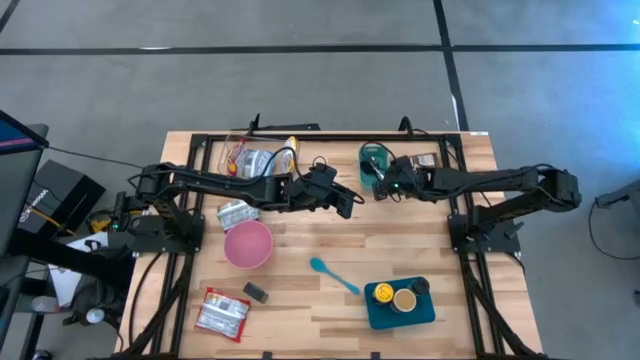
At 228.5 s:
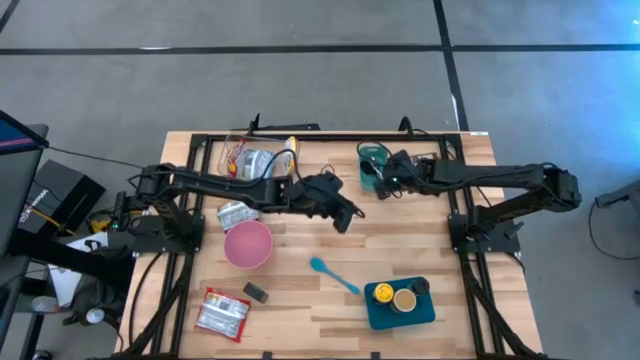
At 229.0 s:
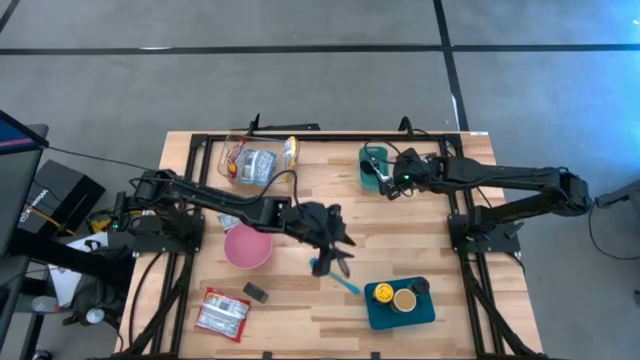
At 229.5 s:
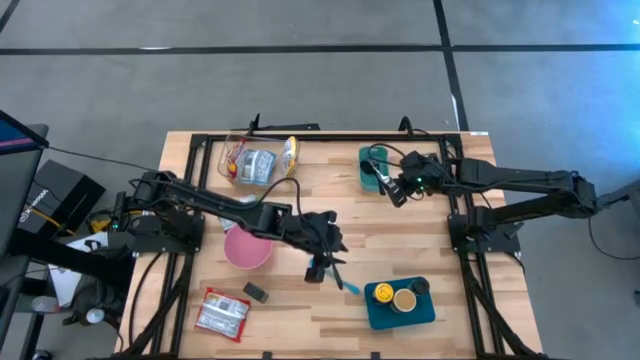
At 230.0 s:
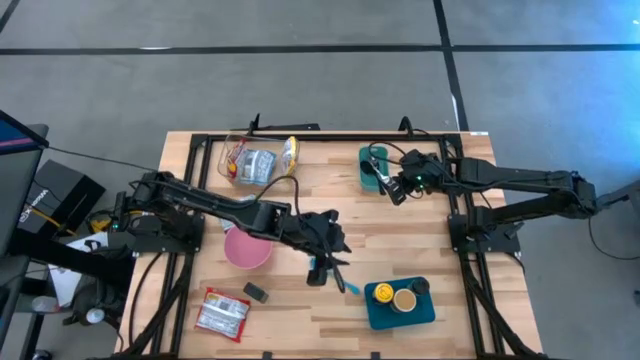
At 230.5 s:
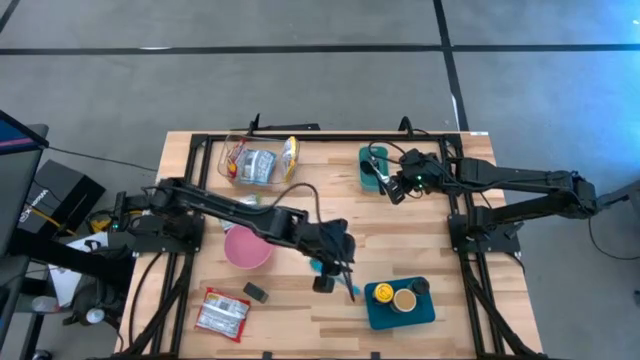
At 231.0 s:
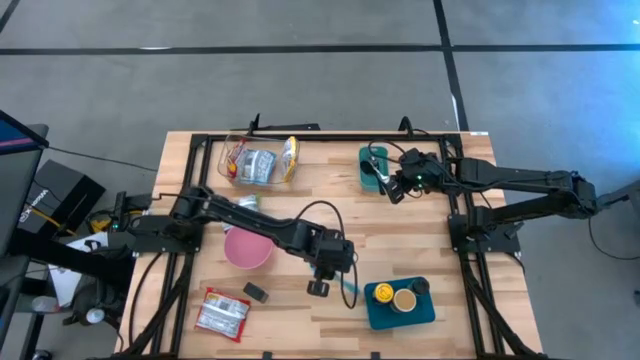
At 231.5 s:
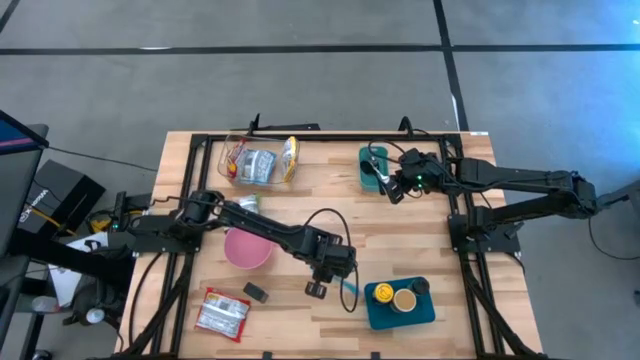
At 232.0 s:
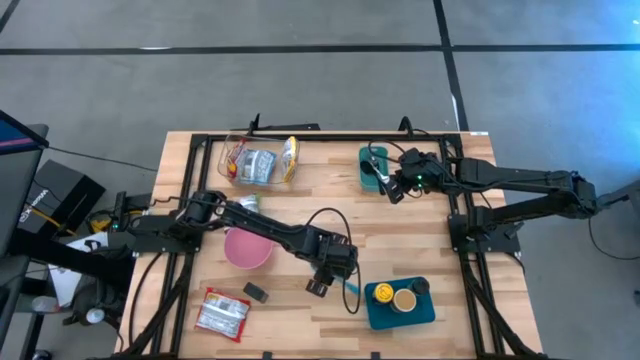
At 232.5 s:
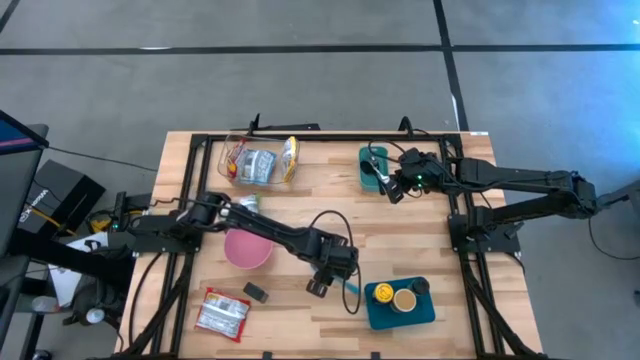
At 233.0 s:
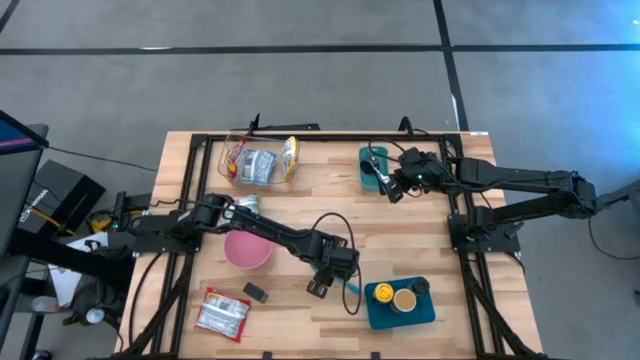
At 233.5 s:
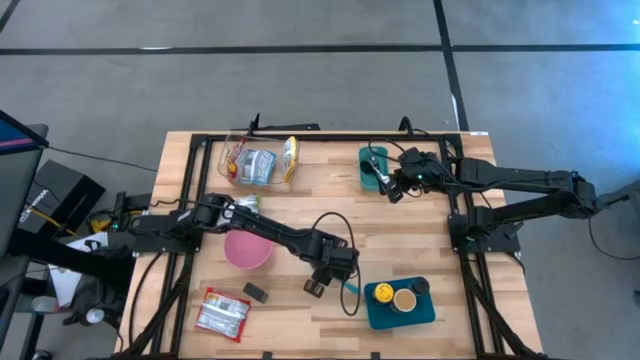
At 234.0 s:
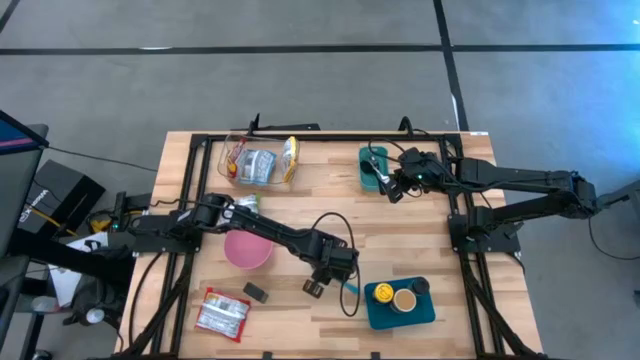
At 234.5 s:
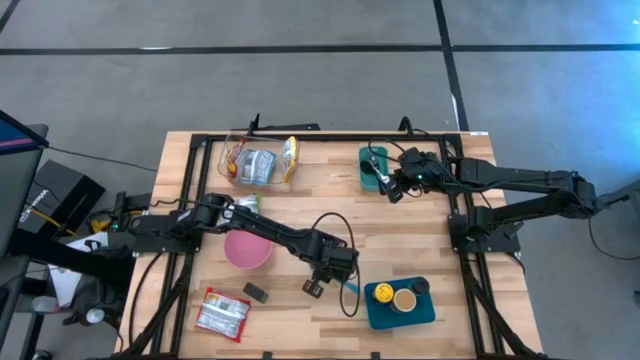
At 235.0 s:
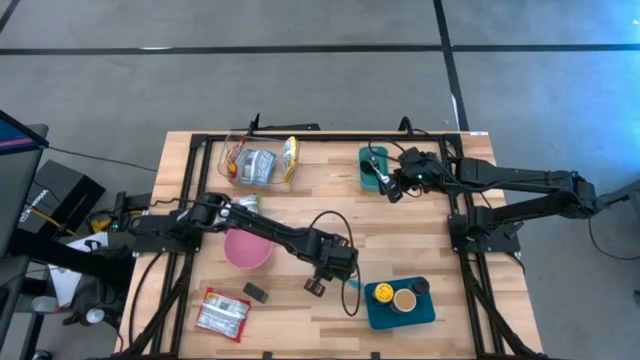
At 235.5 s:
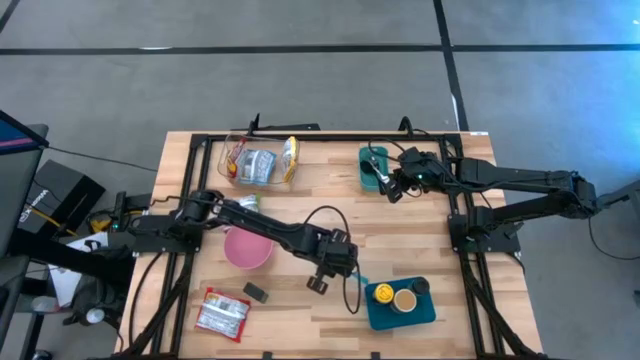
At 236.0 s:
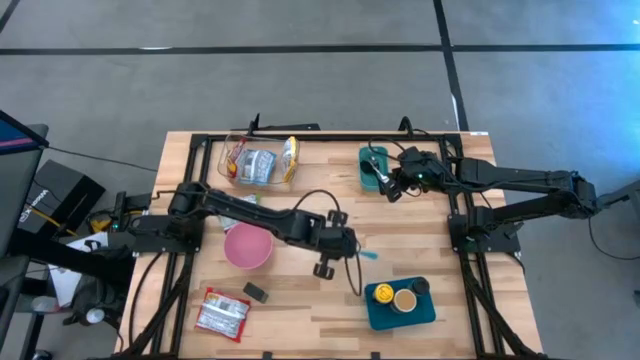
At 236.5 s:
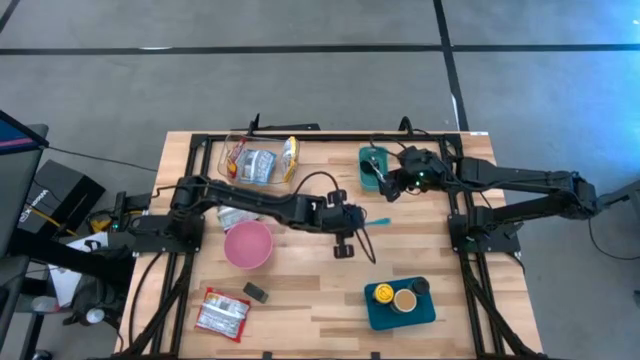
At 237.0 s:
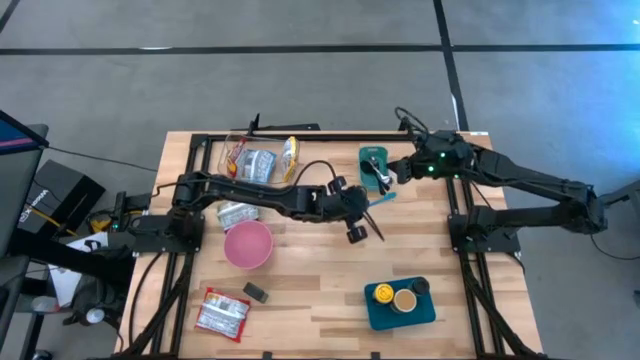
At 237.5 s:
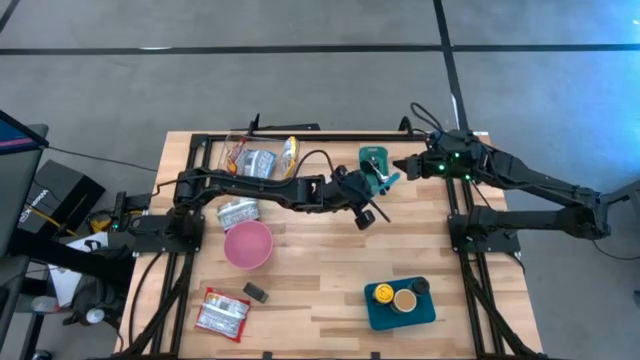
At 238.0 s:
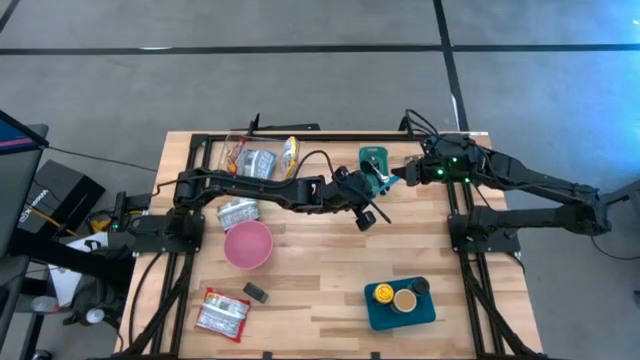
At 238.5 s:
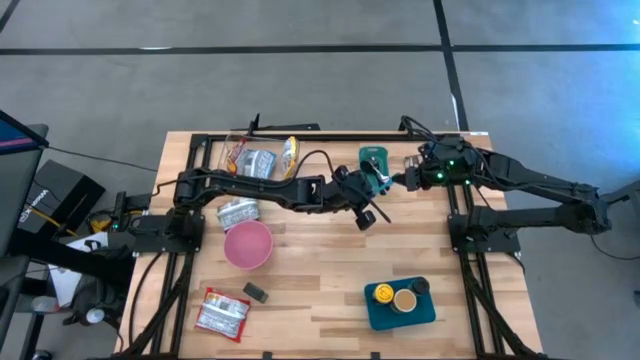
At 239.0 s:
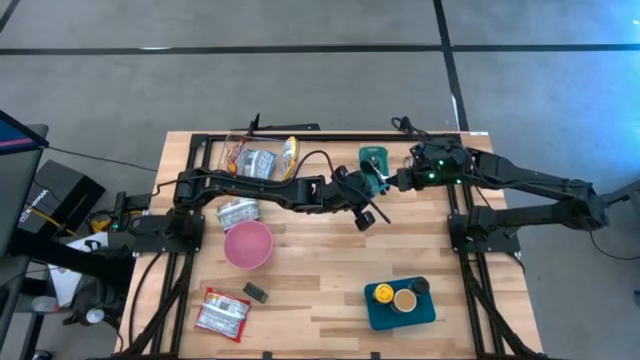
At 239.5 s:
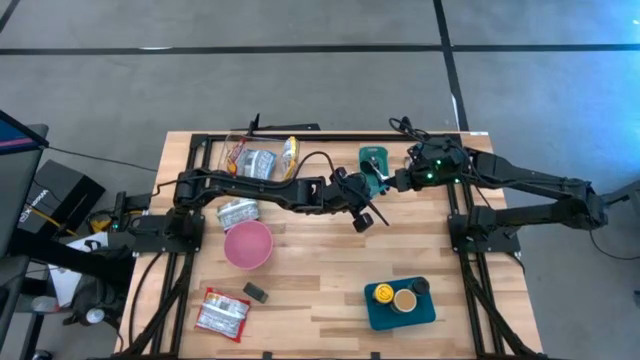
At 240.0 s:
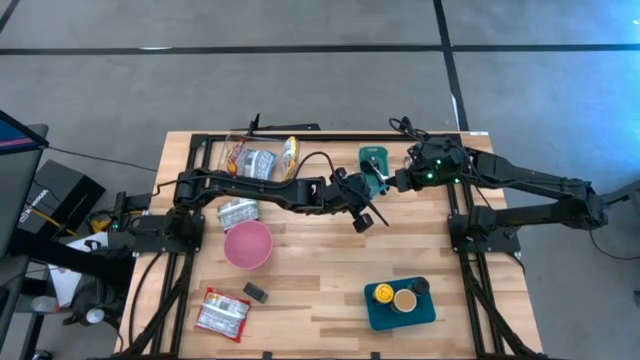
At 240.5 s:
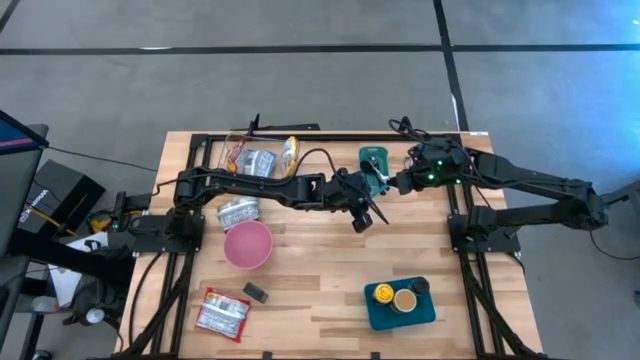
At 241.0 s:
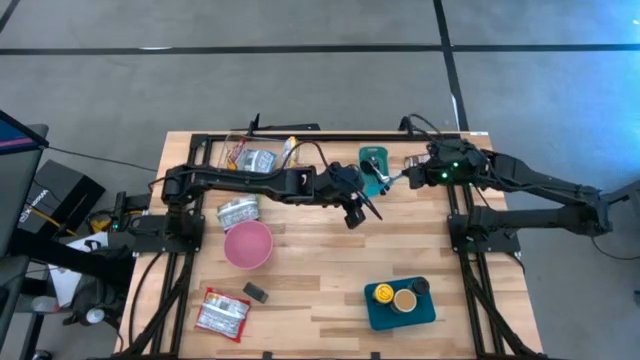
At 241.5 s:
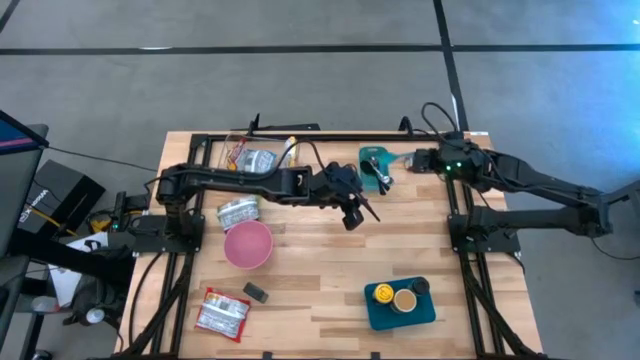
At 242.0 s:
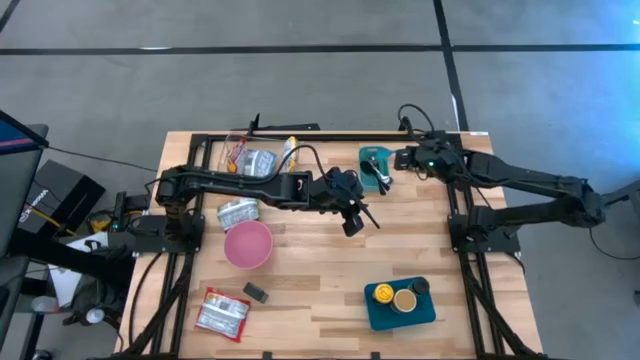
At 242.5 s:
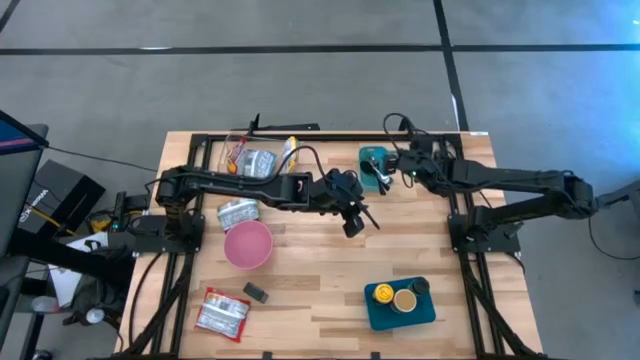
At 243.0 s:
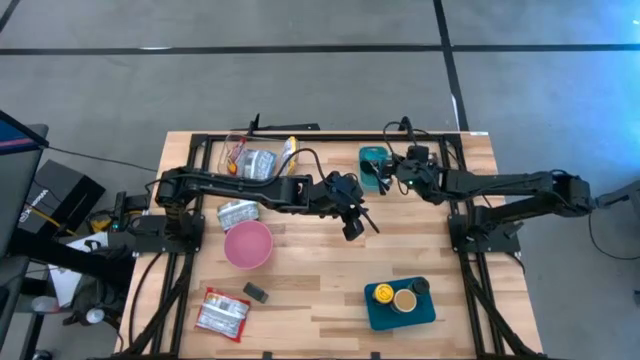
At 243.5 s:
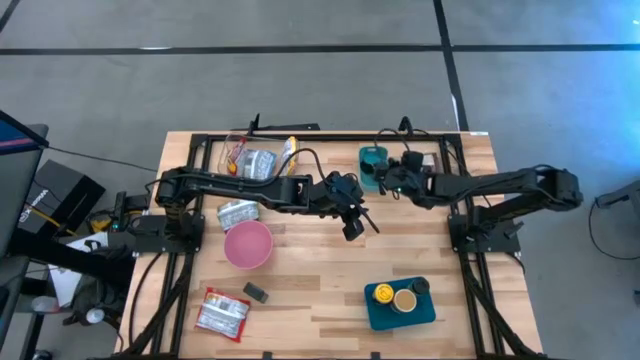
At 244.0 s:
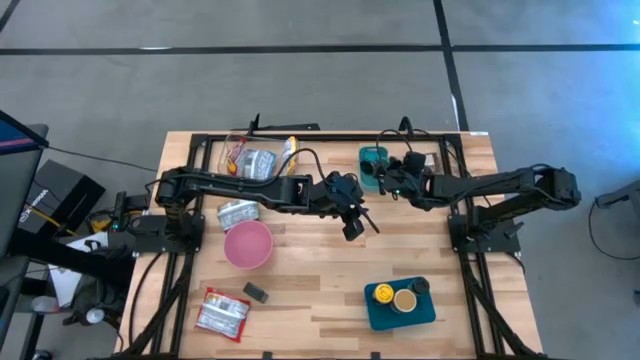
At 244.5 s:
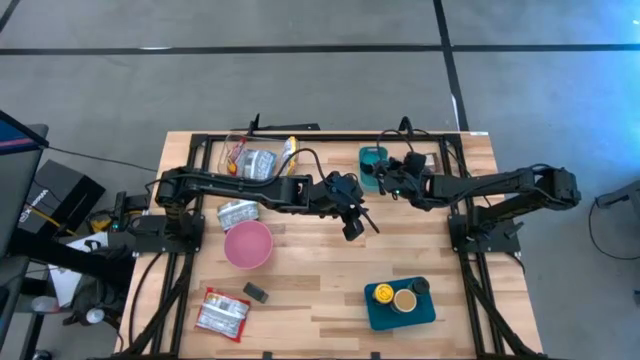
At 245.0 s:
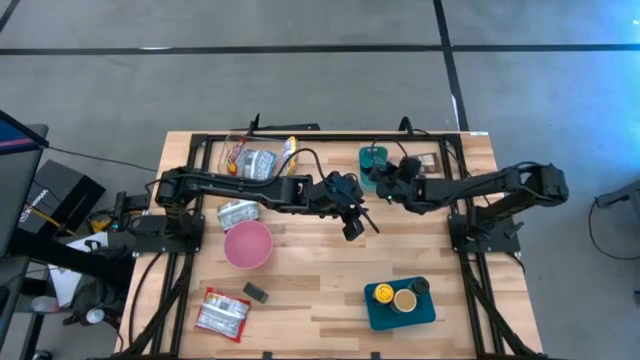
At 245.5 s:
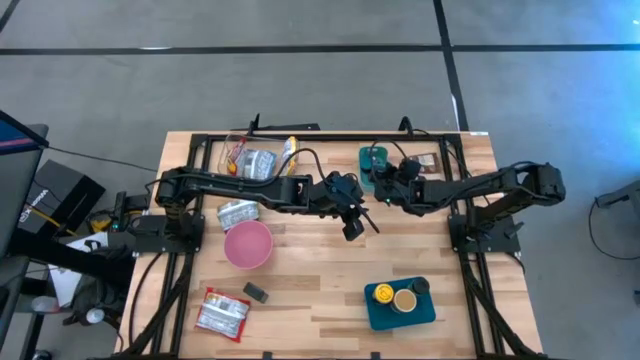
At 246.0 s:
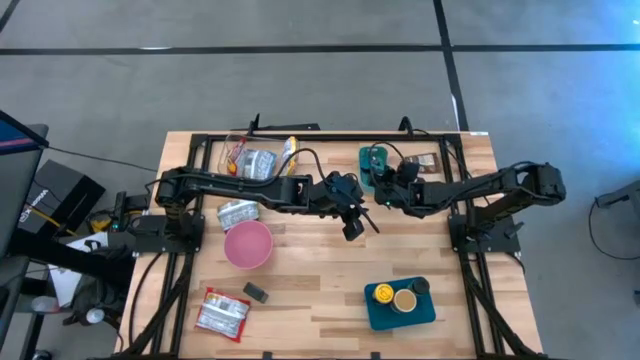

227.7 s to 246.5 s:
Task: Pick & Place Food Item
Put the blue baby spoon into the green bin

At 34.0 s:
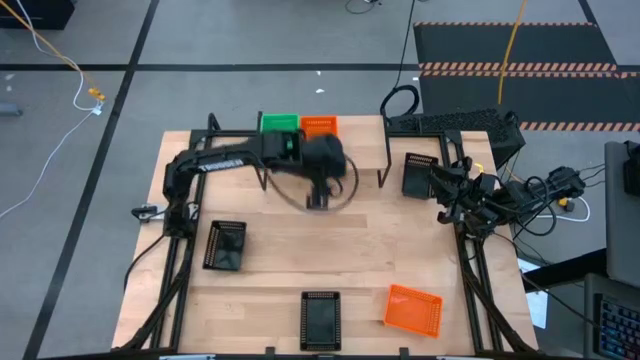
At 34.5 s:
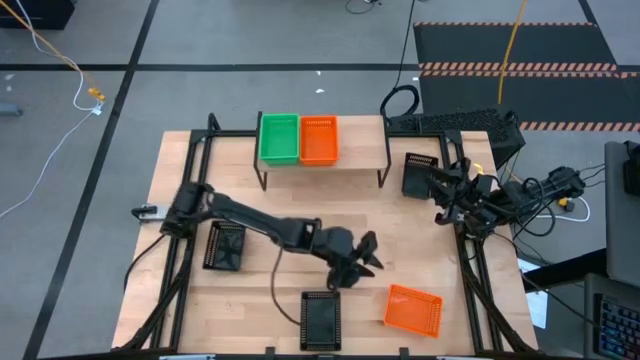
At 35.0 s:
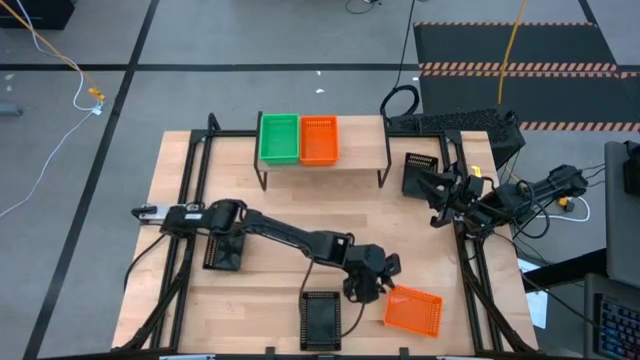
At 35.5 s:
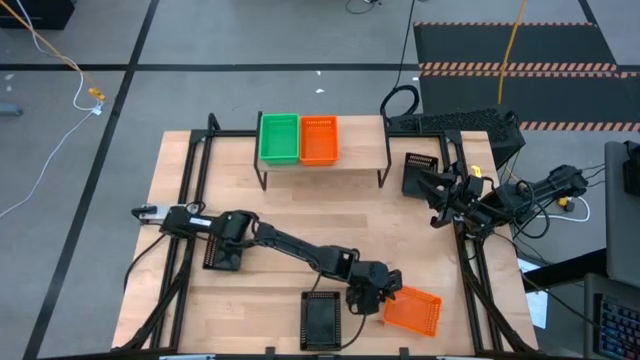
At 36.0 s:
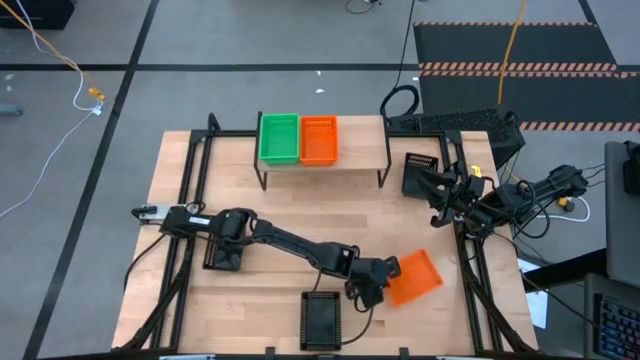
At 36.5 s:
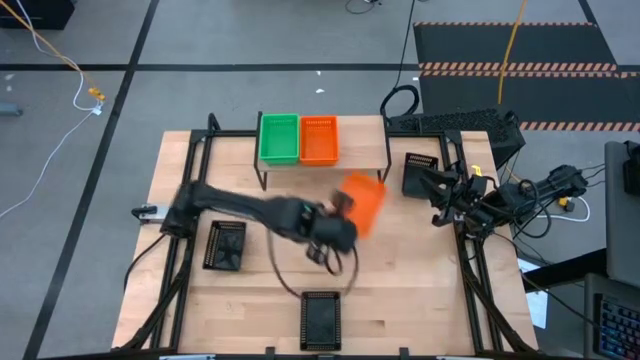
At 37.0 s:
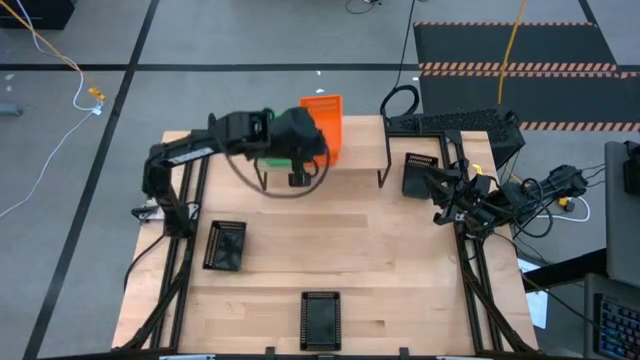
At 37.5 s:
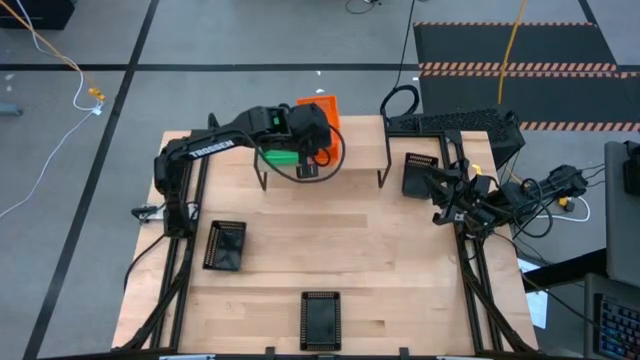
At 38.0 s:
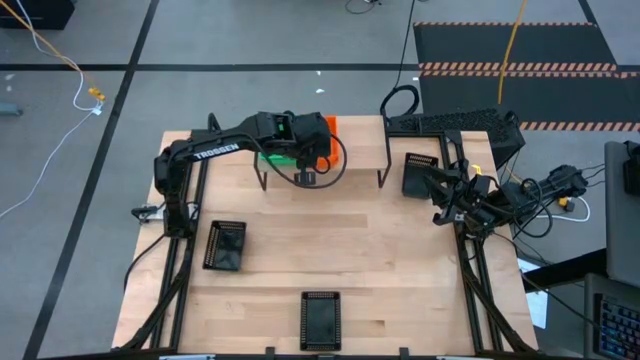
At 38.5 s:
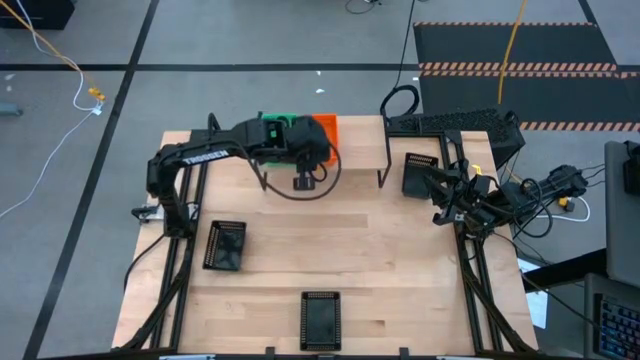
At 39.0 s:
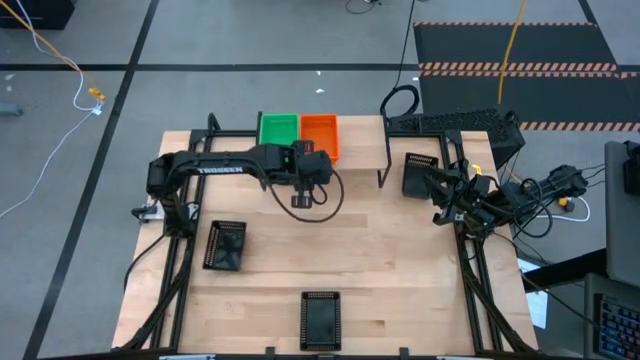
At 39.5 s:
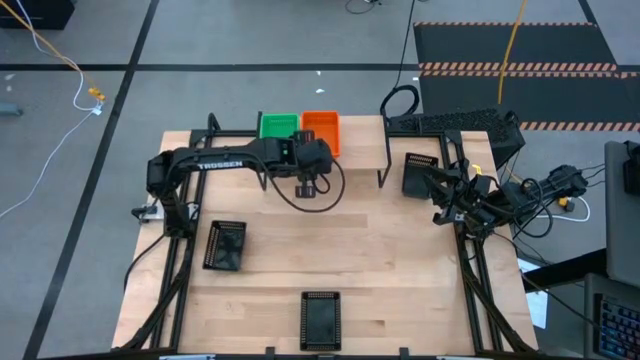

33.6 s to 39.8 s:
Task: Stack baskets on shelf by color
Stack the orange bin on top of the orange bins on the shelf
